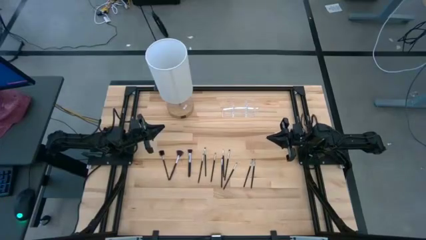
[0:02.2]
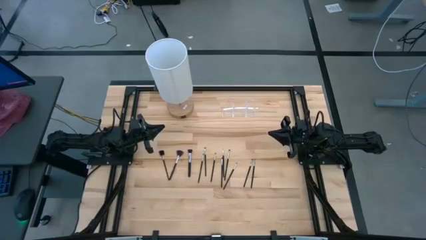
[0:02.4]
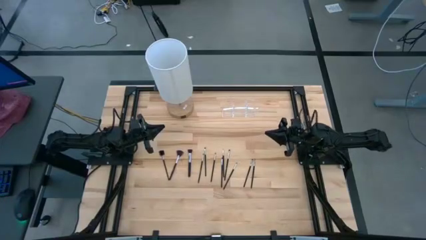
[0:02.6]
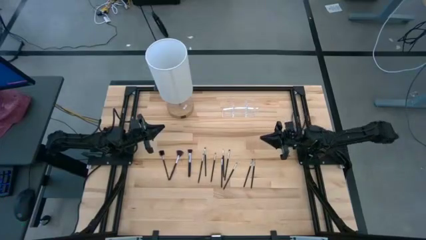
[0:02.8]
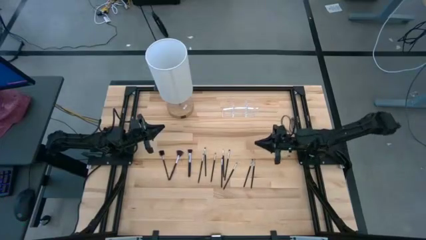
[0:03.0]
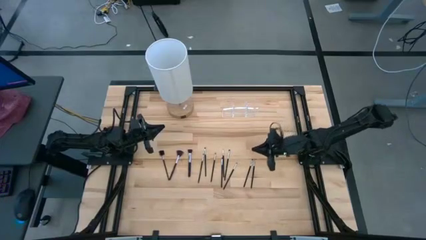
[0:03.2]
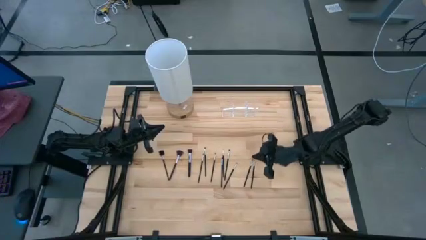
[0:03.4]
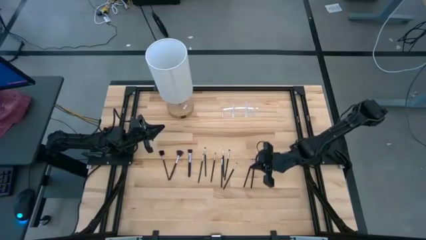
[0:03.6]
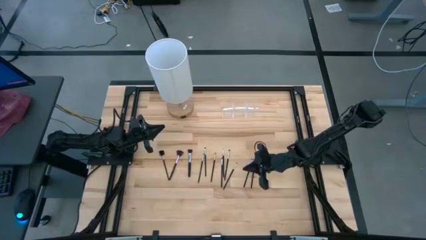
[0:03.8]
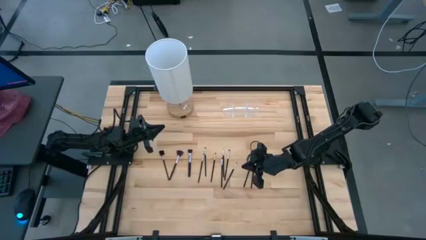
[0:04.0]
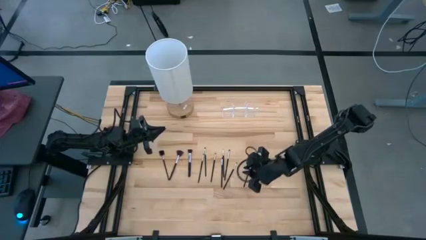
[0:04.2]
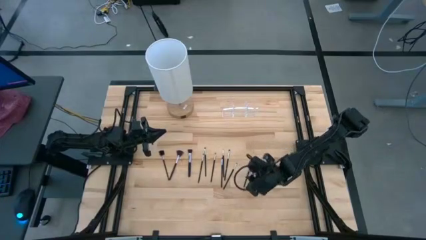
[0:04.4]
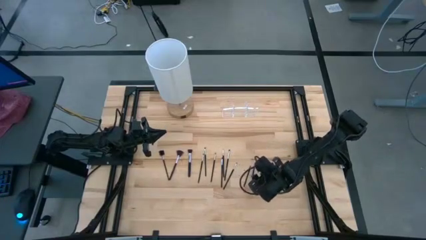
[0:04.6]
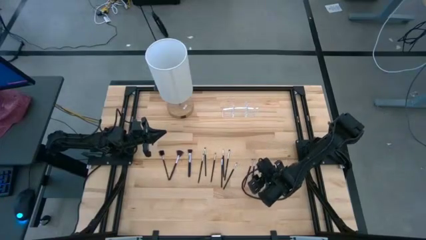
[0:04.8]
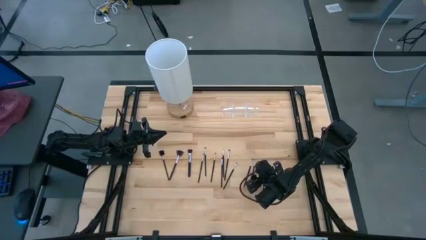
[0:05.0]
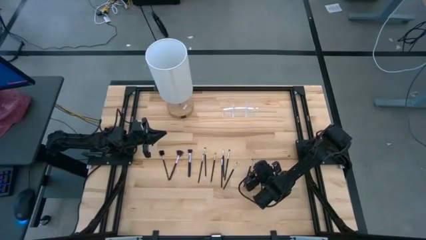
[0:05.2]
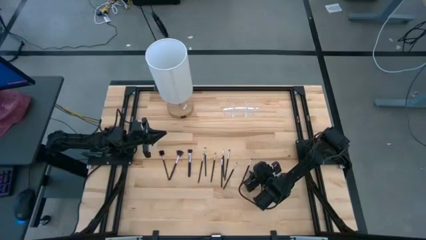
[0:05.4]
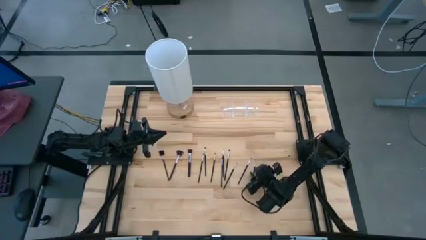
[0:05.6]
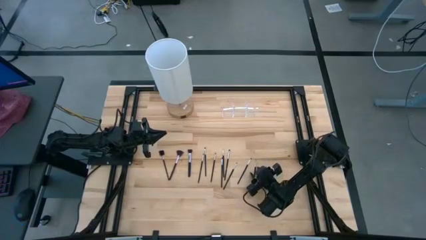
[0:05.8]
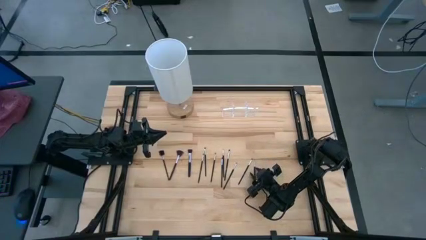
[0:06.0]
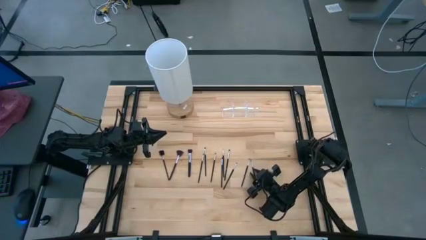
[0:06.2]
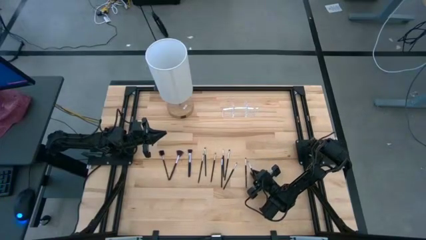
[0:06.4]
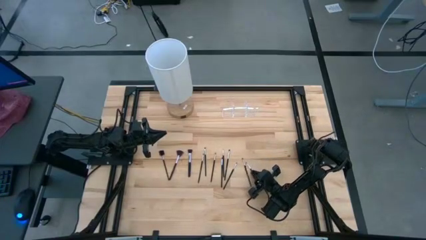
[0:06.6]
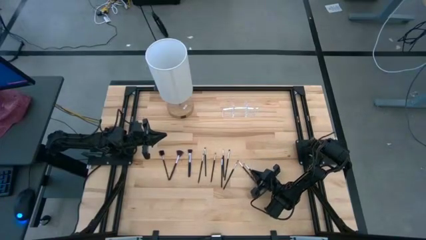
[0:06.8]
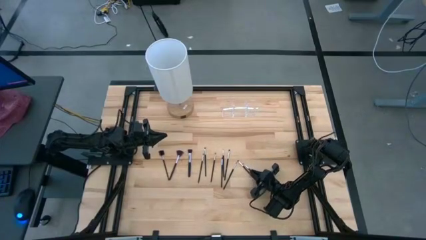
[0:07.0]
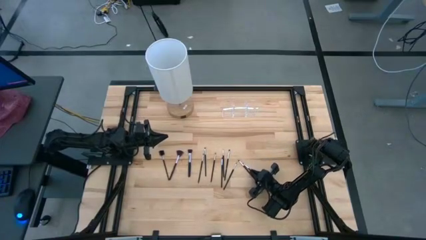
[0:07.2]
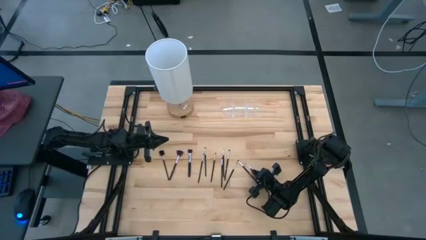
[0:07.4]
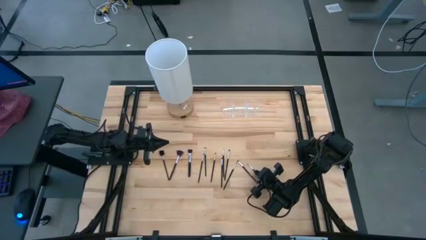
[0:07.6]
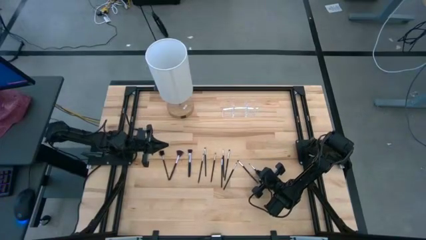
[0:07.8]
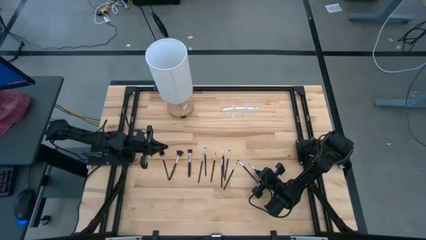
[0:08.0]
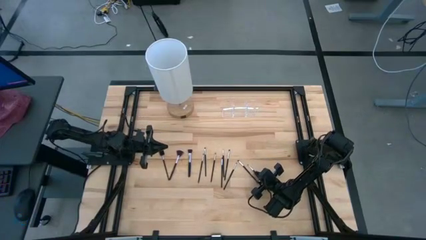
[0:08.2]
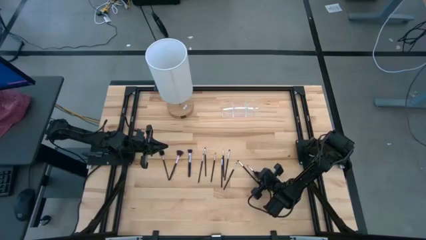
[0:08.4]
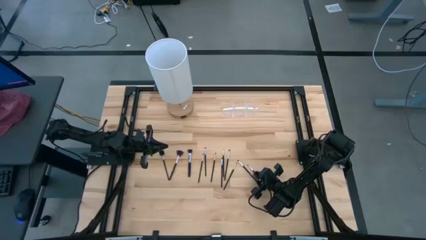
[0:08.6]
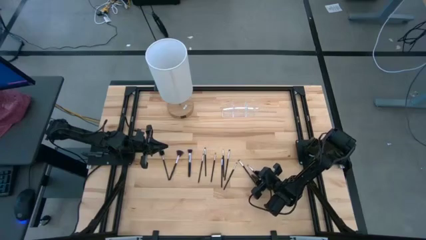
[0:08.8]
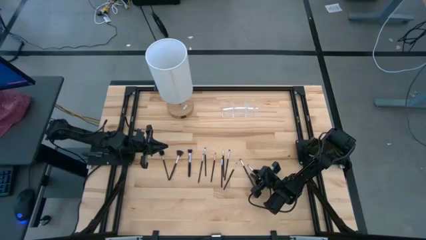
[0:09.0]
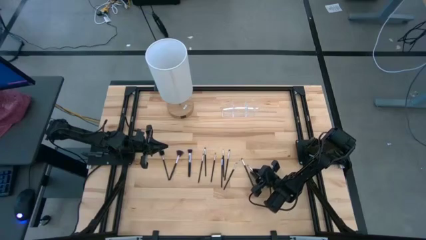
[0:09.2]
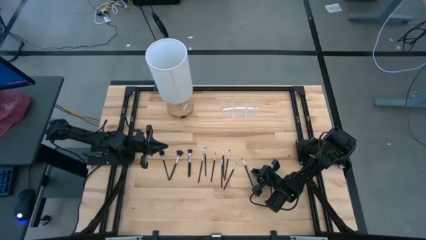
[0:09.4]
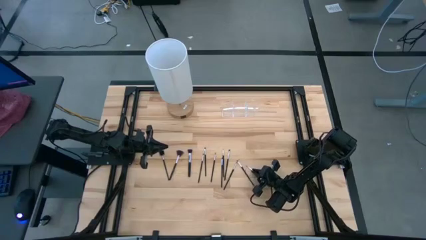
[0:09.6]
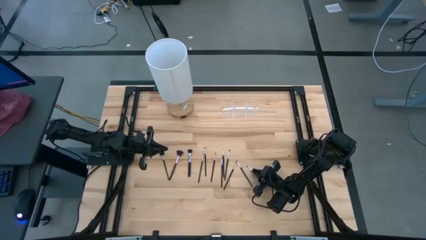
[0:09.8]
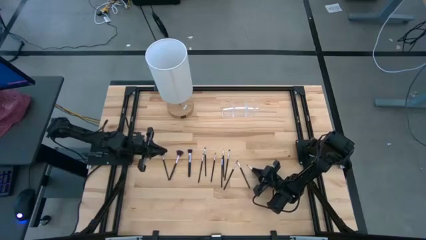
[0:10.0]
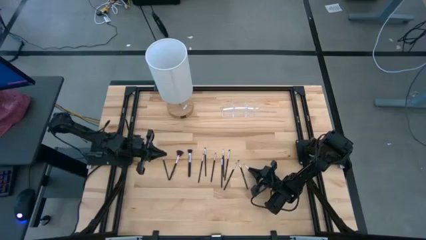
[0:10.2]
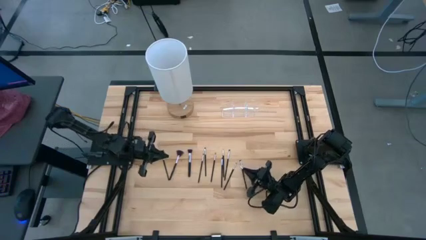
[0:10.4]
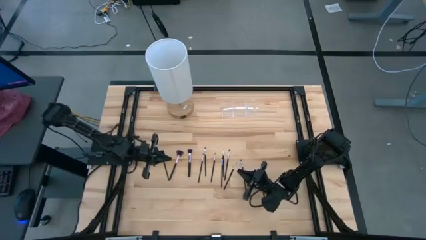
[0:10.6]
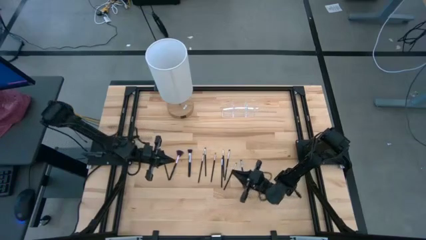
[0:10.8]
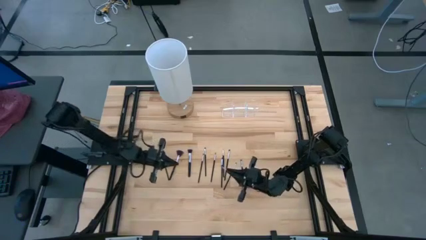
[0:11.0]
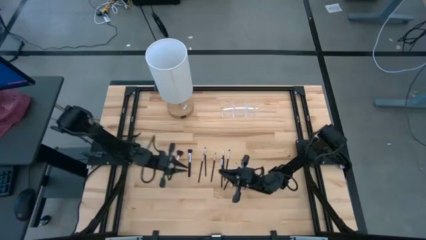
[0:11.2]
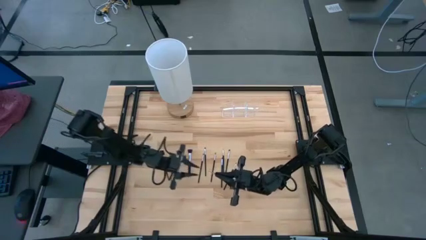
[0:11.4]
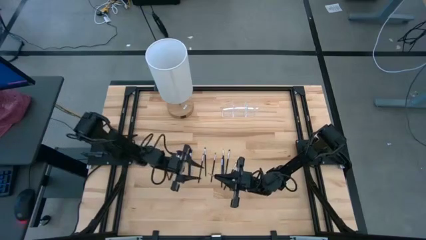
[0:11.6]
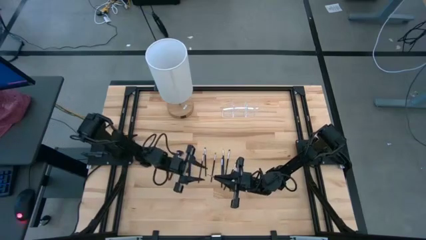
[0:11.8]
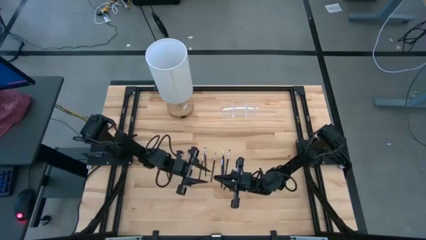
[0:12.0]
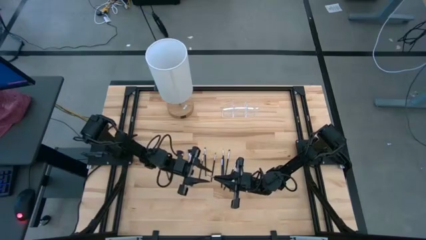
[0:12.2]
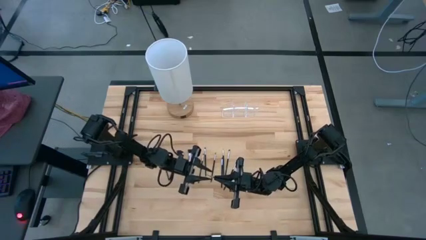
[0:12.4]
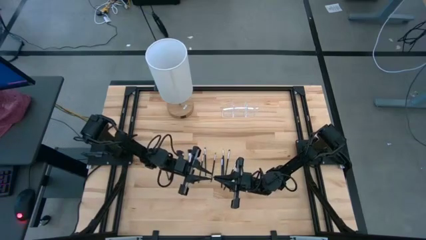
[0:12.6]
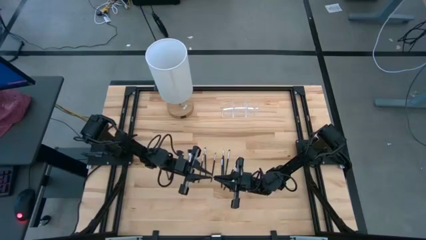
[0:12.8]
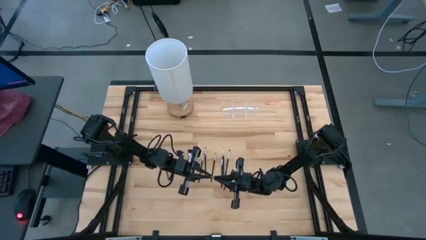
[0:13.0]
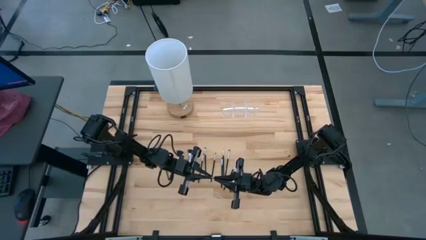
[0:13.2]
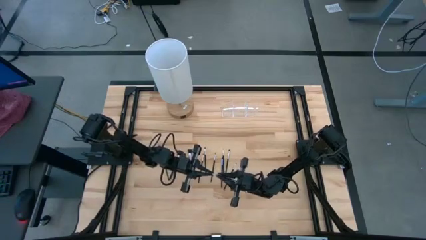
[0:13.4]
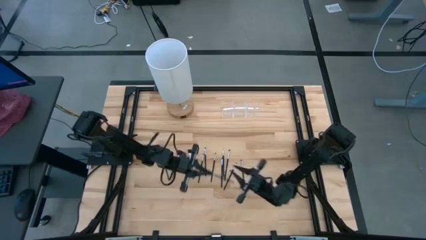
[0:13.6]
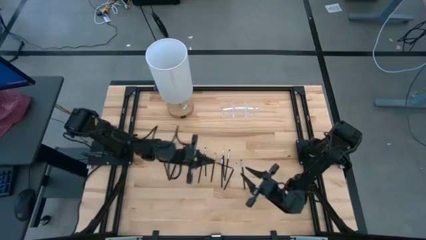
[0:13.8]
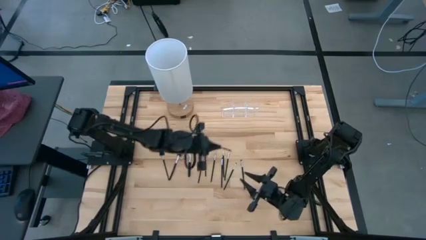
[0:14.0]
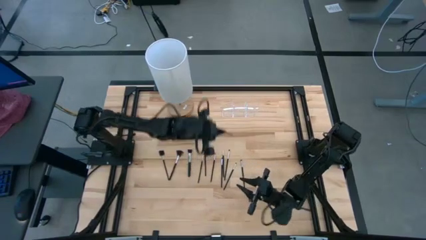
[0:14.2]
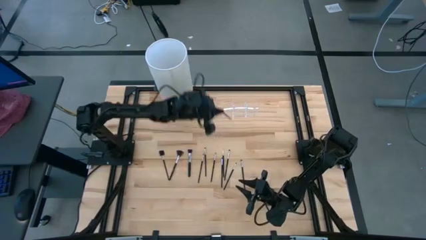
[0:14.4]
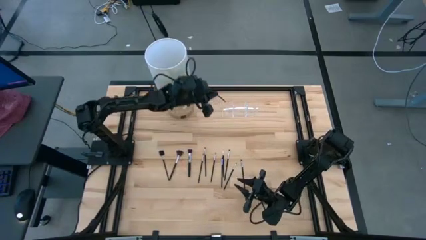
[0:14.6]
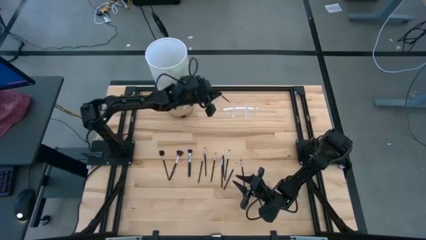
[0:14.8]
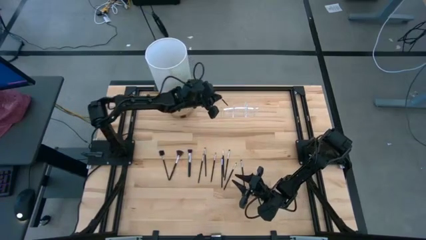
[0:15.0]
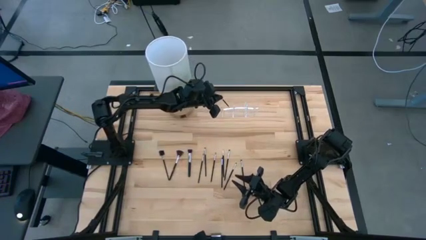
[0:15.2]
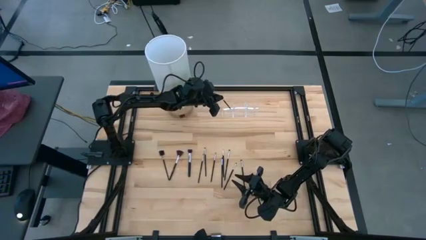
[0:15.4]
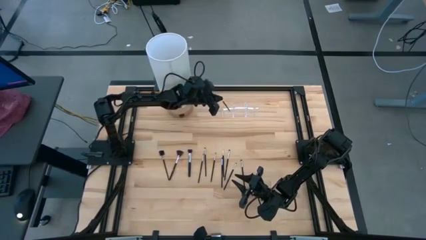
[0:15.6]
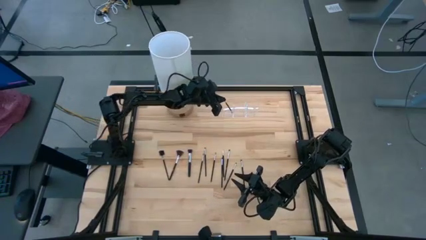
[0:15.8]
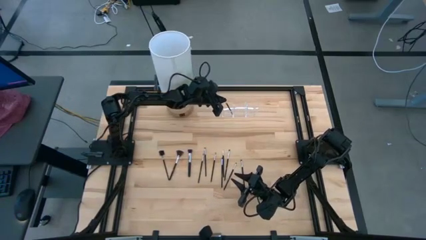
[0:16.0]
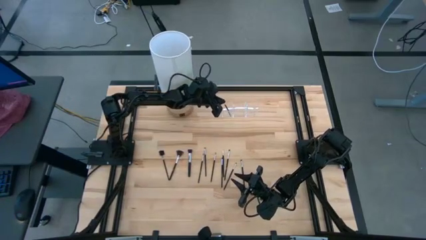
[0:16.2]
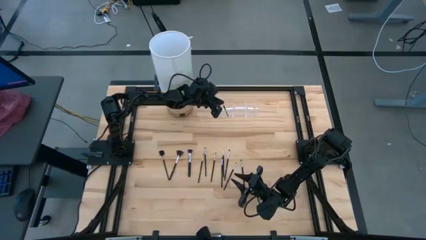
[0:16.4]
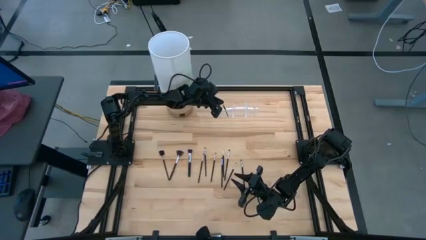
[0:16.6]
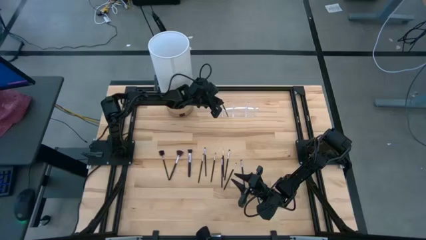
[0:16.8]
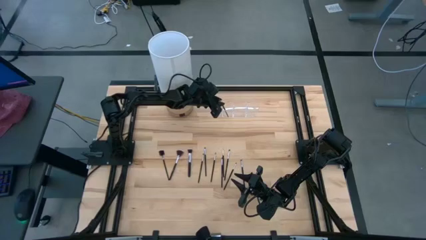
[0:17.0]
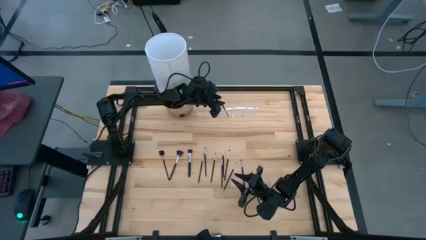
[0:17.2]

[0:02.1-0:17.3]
Task: Sort items
Put the eyeshadow brush into the transparent organizer
